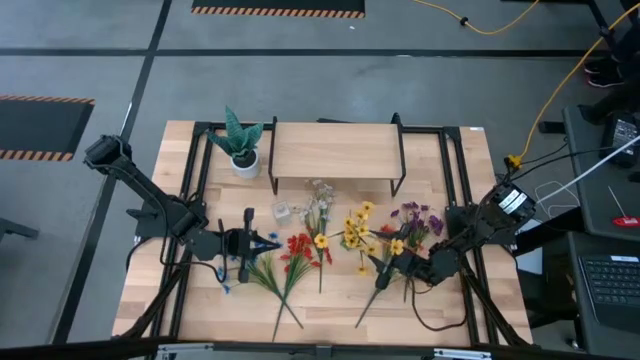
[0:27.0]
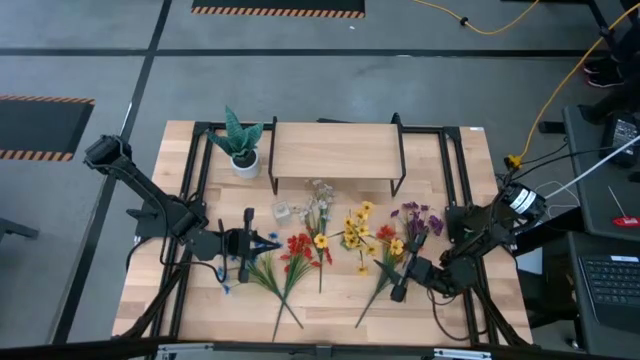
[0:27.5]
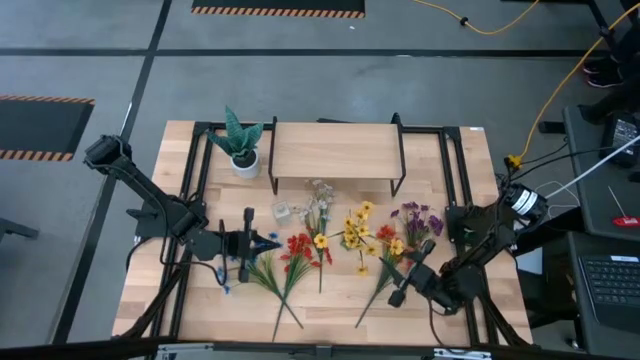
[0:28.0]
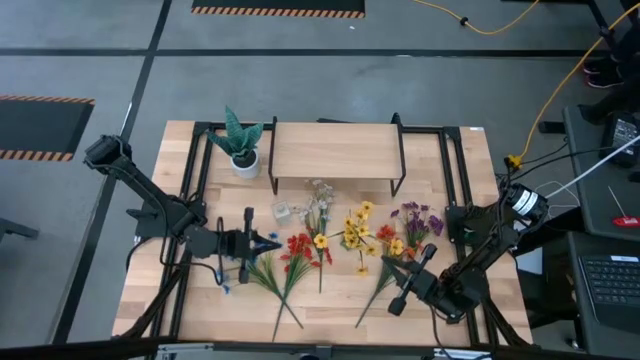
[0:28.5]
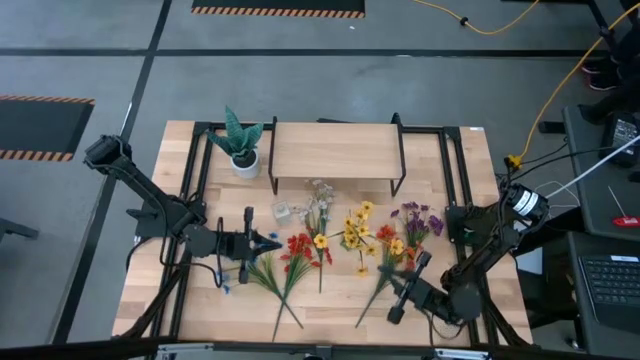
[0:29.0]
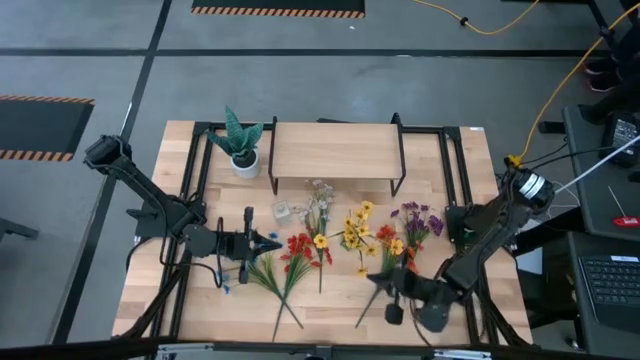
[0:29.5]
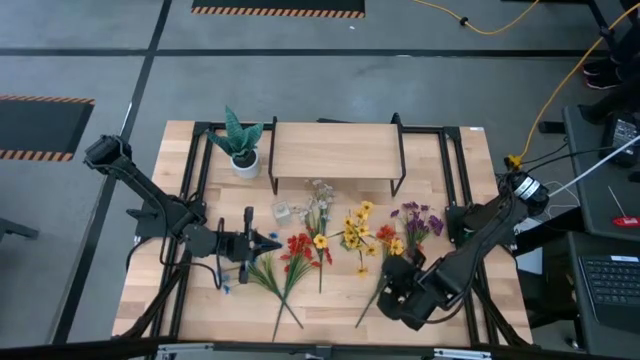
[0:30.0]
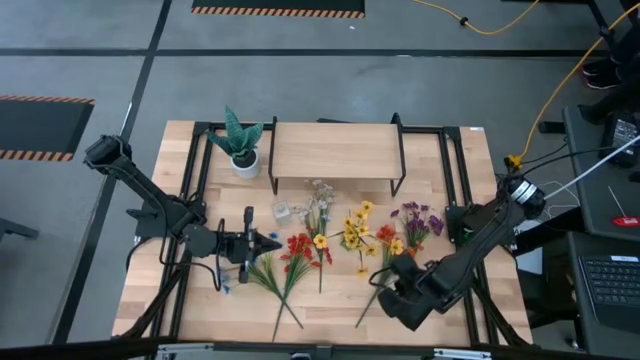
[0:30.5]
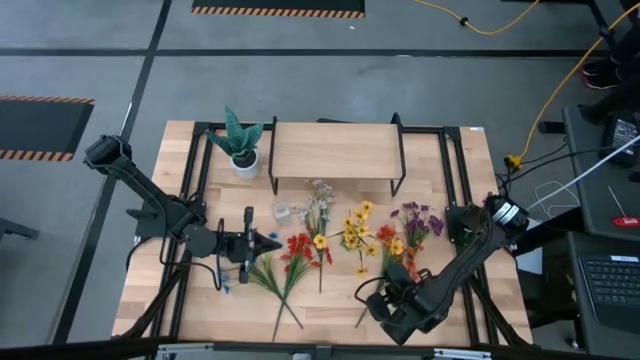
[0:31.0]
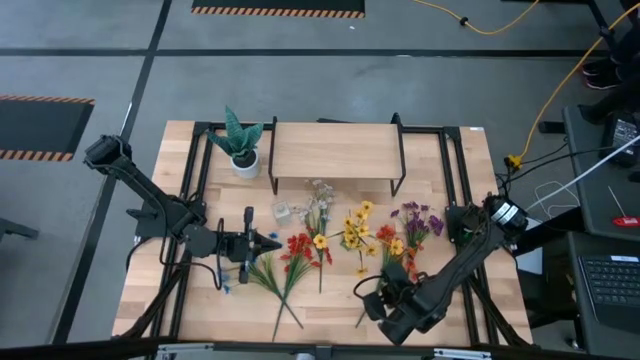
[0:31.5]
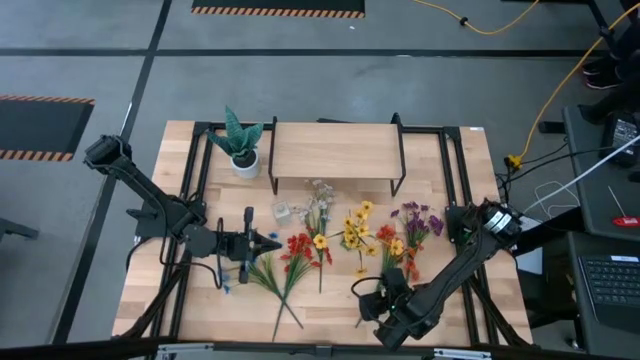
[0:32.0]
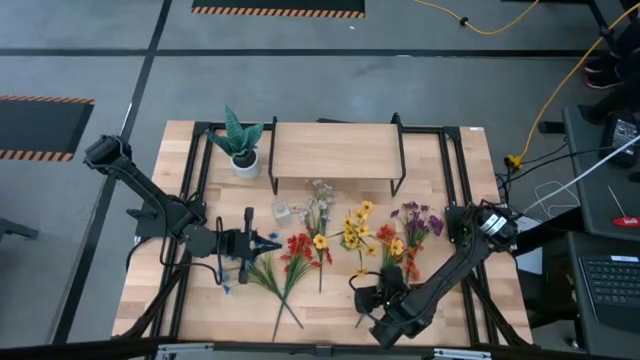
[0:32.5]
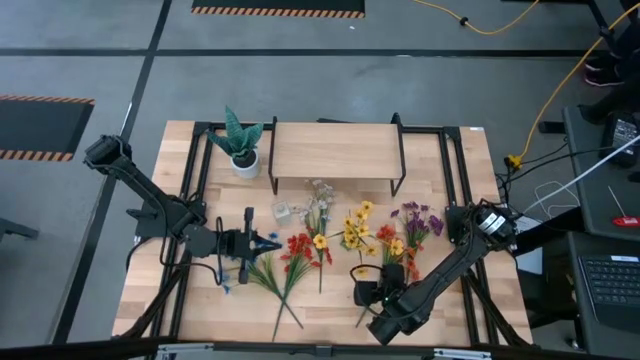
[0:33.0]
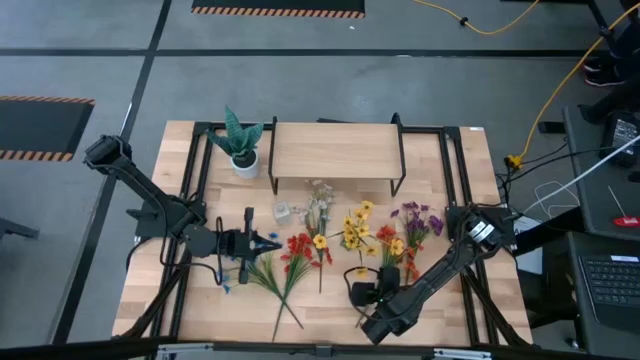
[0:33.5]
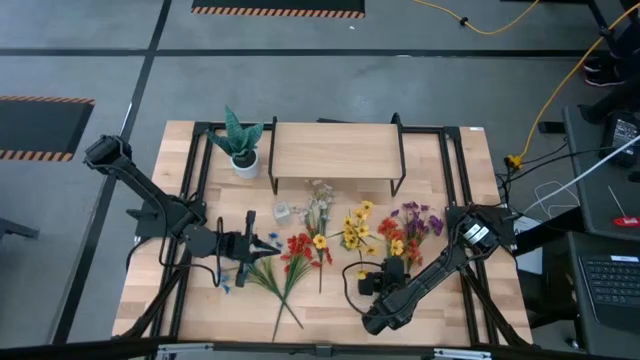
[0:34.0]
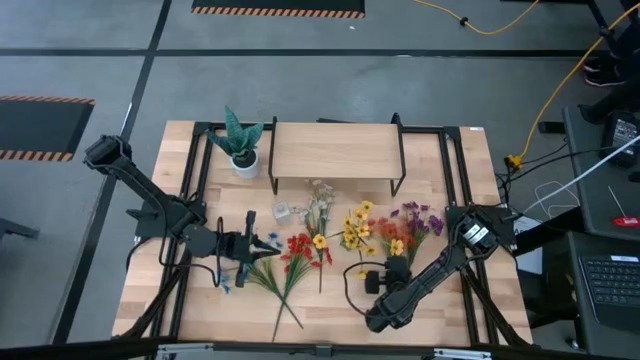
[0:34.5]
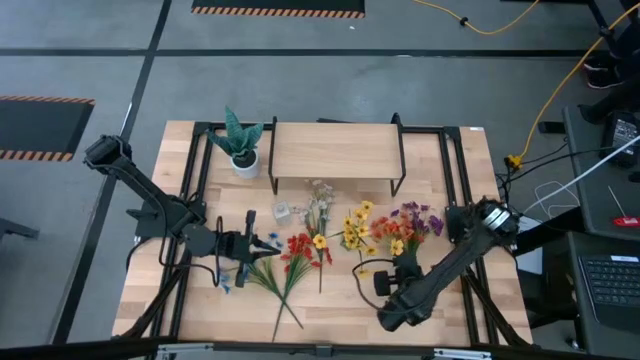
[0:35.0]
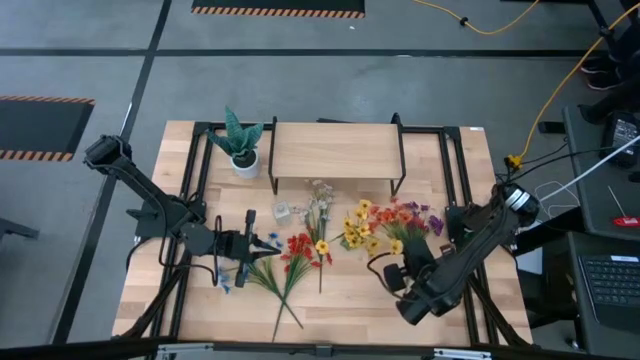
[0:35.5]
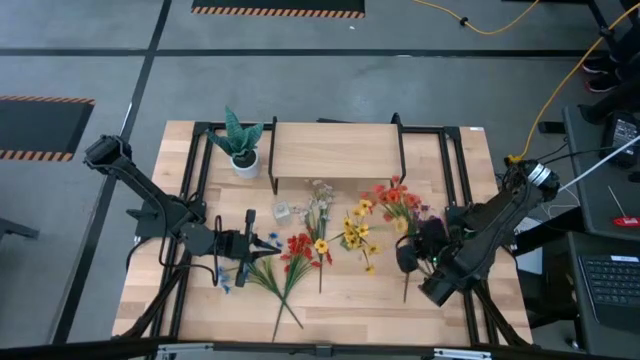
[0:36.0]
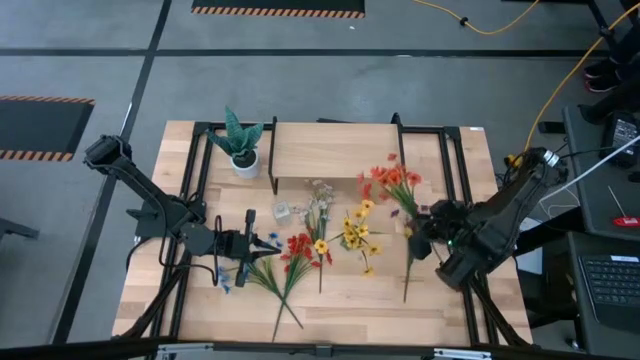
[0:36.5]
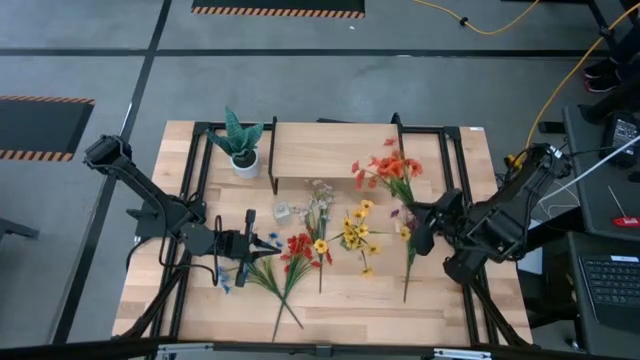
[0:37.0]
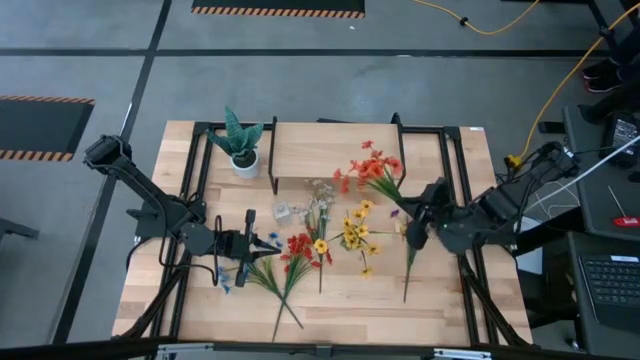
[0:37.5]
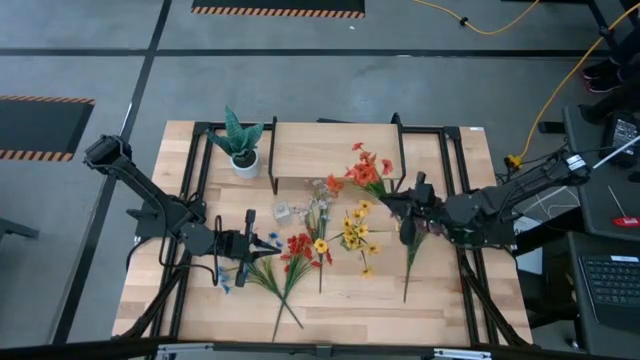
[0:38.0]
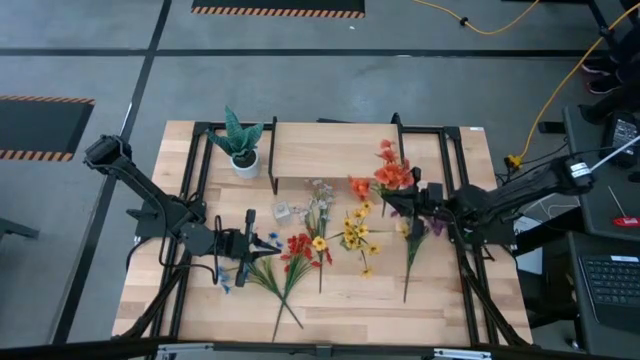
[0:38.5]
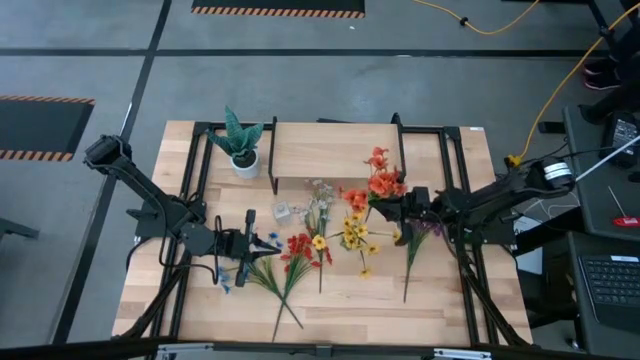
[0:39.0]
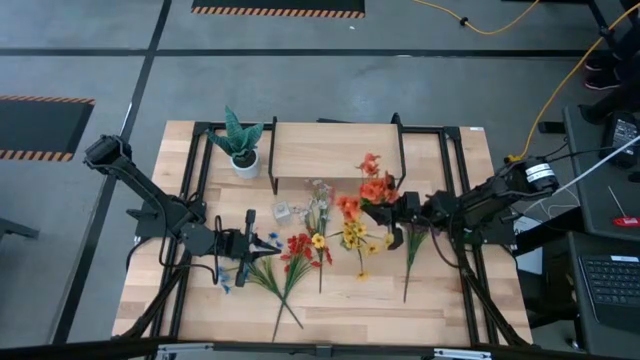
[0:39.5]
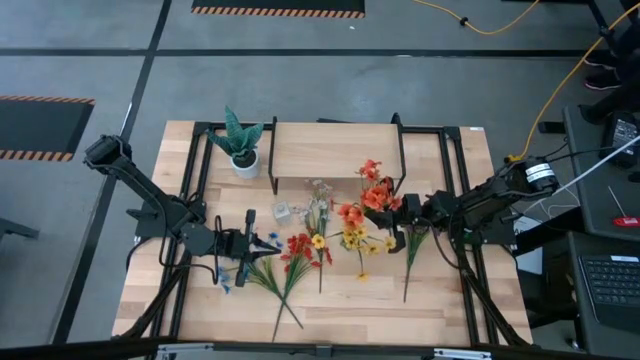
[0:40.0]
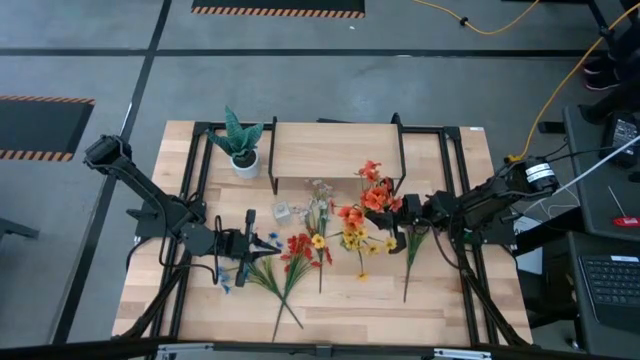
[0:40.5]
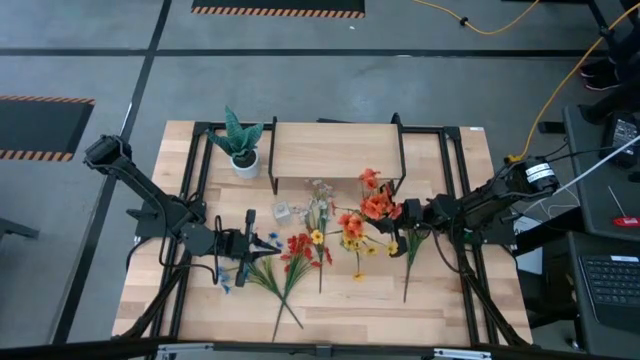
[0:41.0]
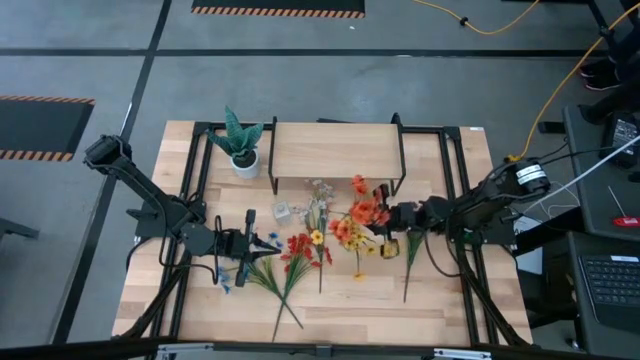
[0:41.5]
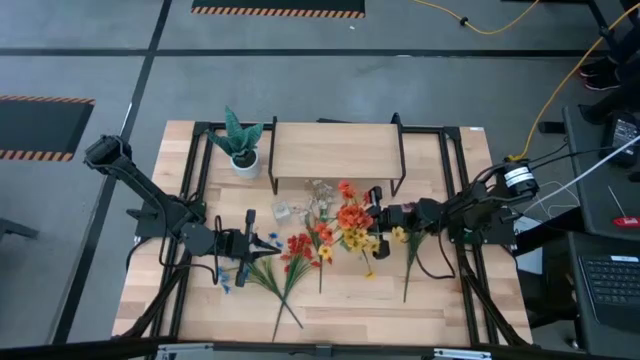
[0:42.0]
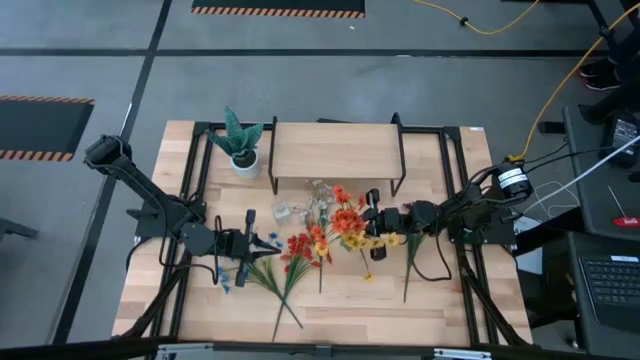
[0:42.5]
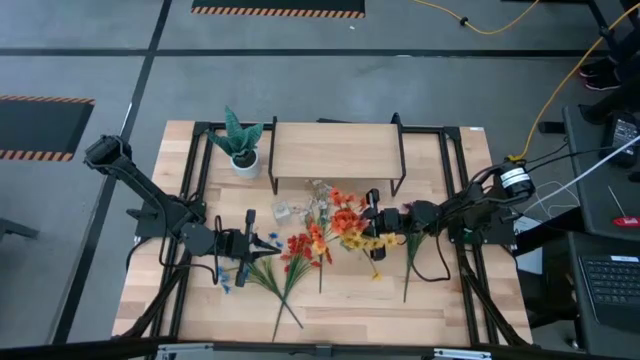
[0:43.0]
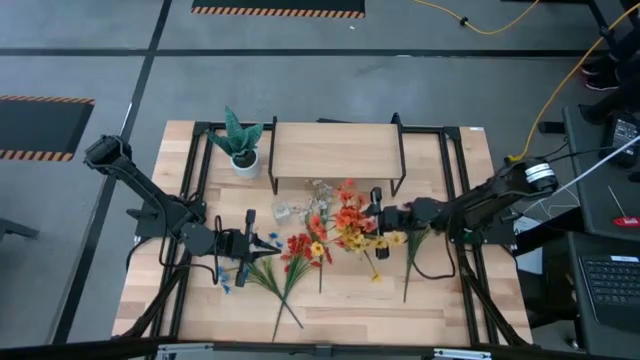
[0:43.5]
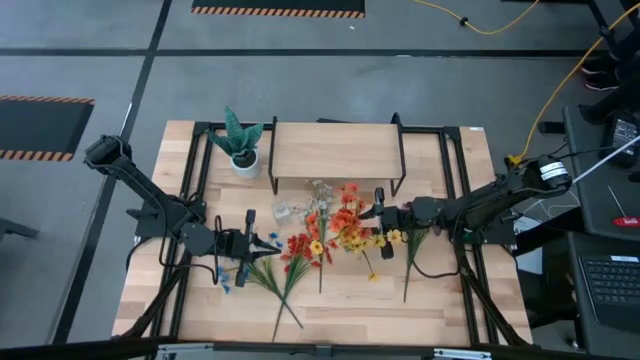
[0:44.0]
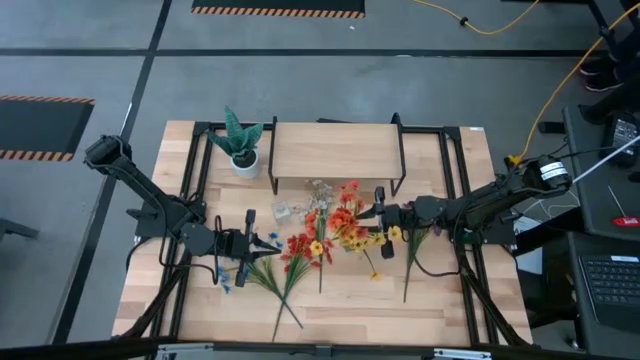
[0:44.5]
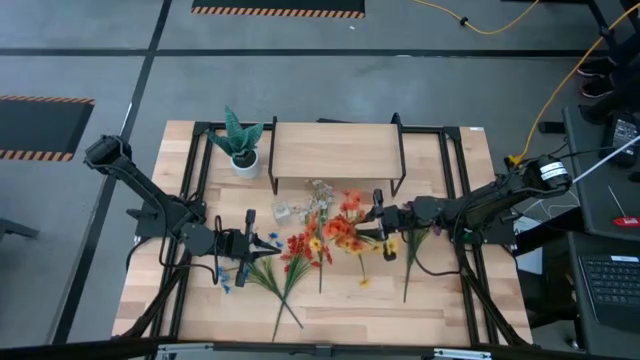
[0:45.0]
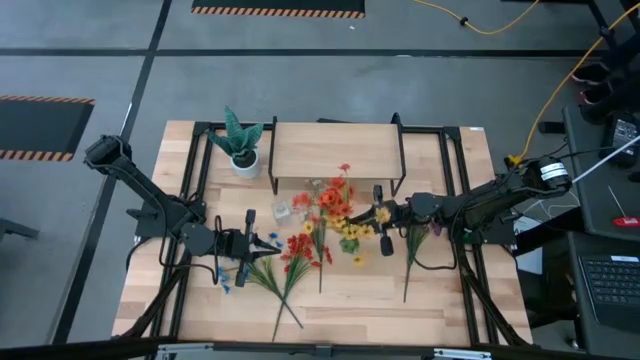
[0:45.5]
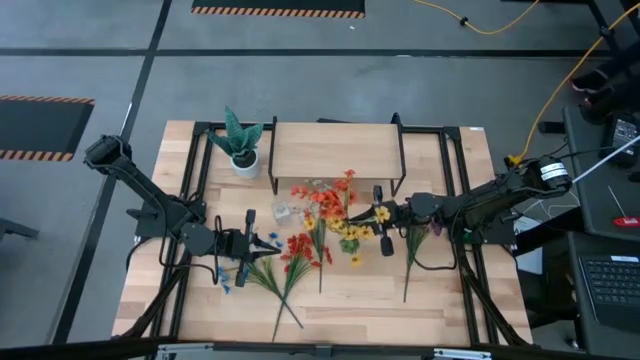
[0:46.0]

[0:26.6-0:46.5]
Task: Pick and place flowers into a vace then onto a shelf
Put the orange flowers into the green vase

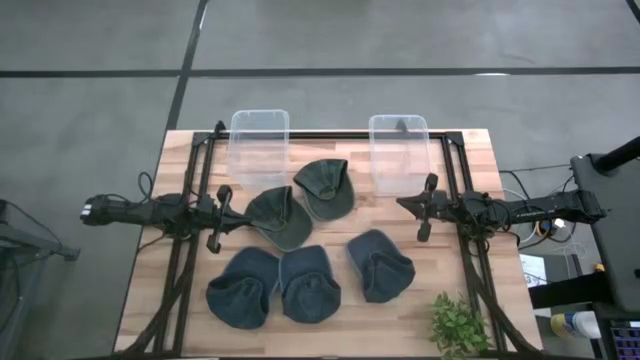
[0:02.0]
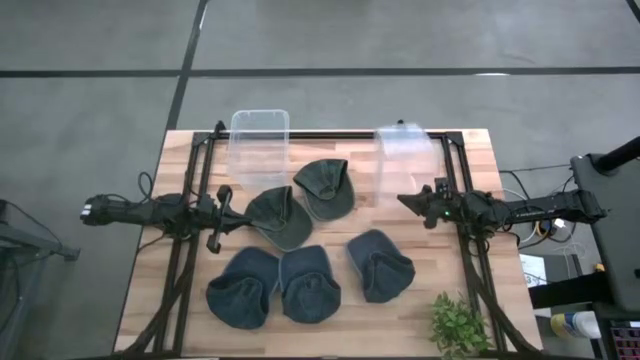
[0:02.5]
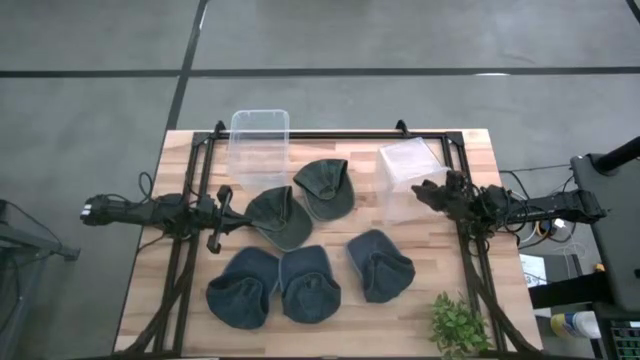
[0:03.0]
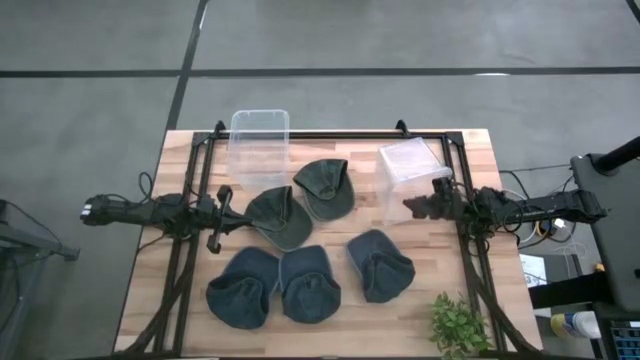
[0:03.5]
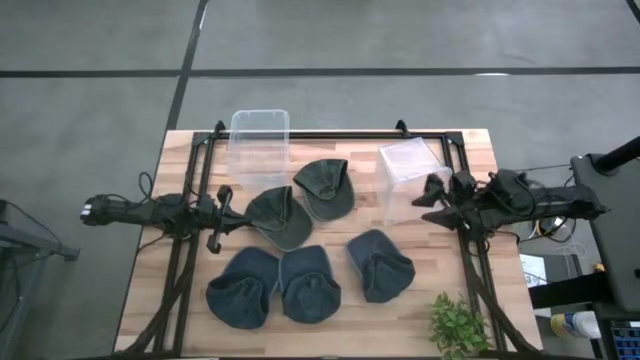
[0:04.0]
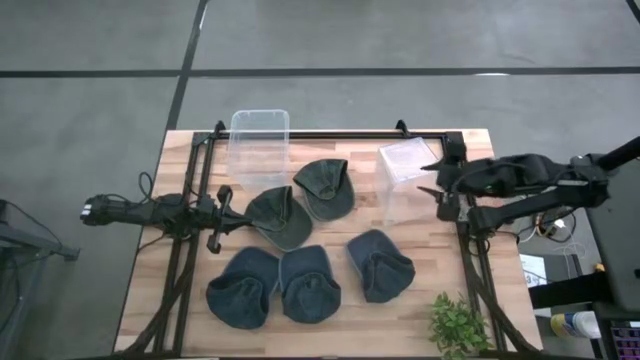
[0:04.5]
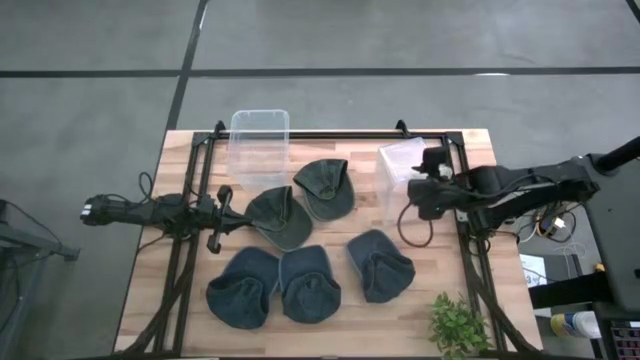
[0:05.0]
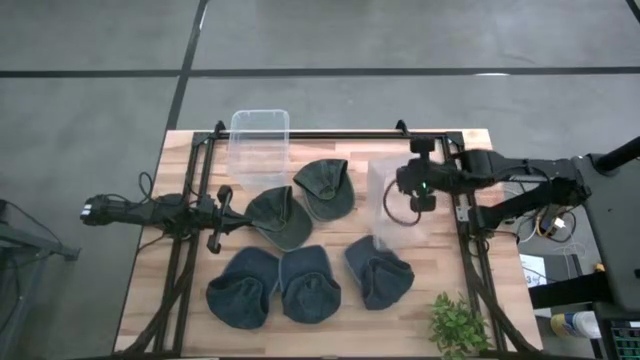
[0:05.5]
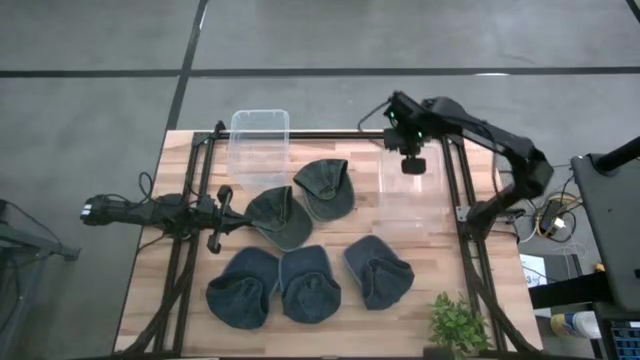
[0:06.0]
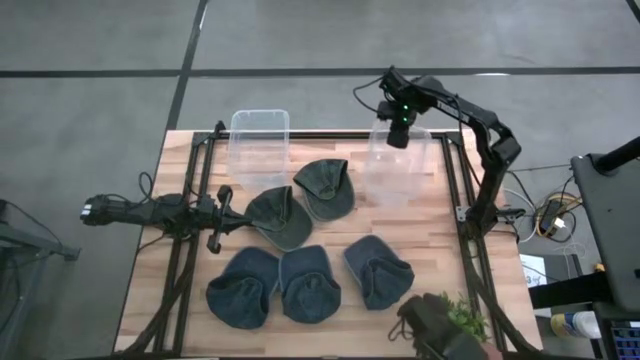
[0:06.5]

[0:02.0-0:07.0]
Task: Pick & Place hat
Adjust the right transparent bin
